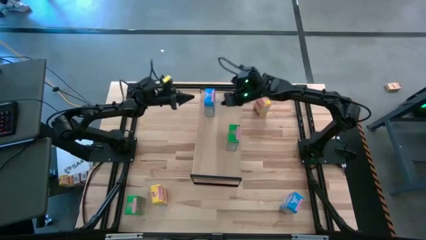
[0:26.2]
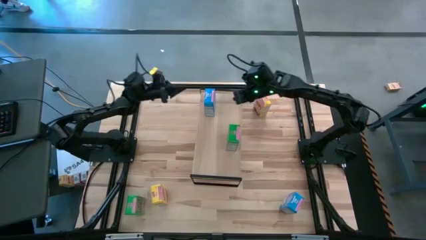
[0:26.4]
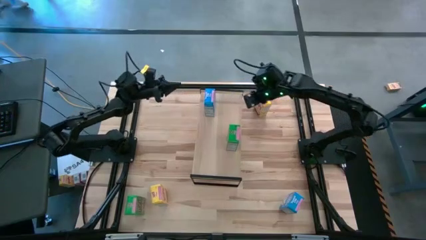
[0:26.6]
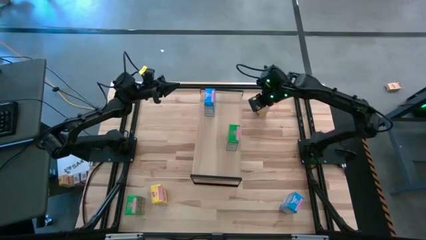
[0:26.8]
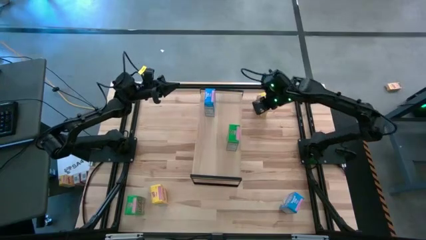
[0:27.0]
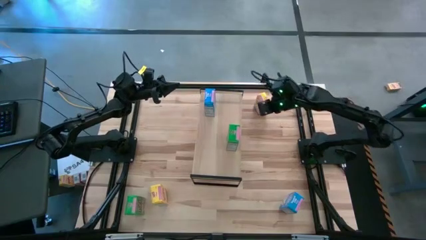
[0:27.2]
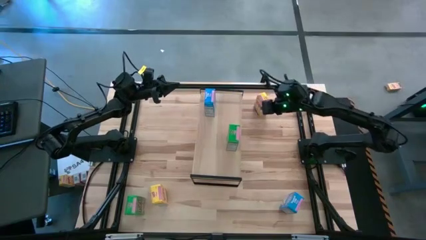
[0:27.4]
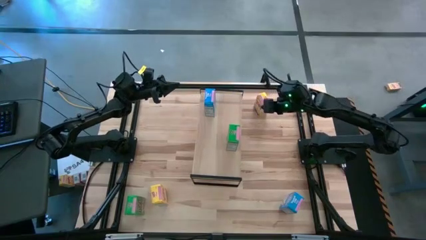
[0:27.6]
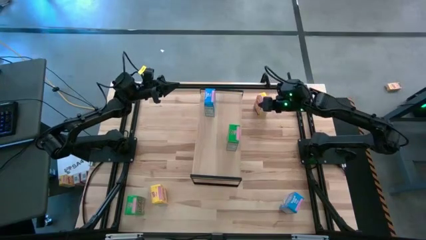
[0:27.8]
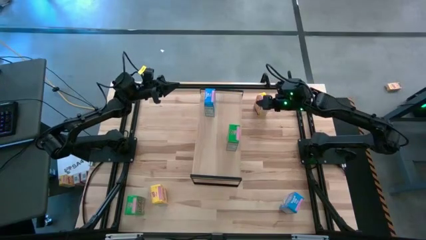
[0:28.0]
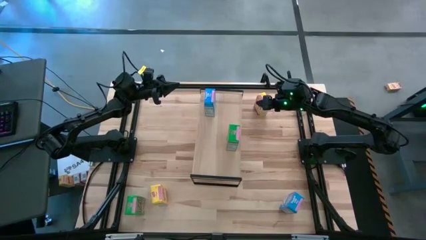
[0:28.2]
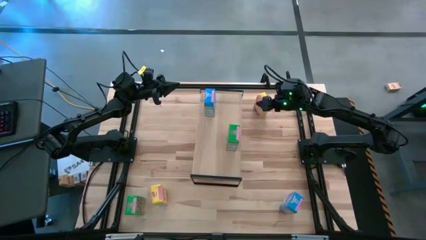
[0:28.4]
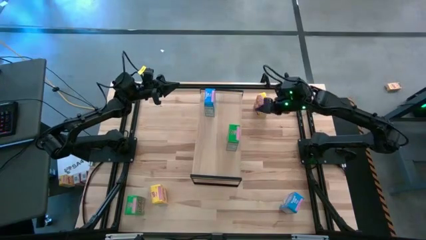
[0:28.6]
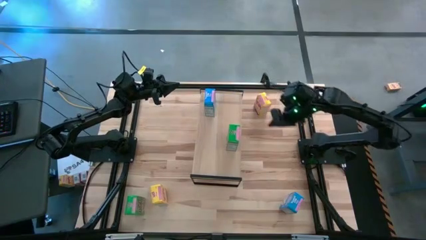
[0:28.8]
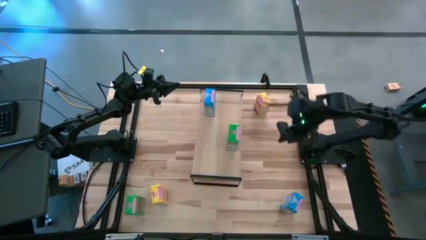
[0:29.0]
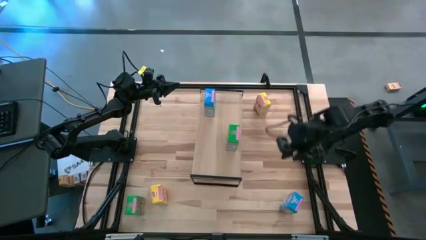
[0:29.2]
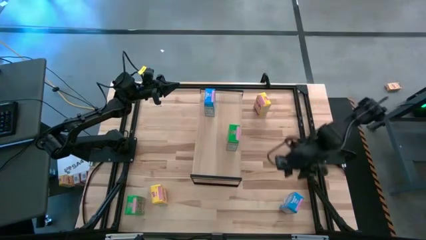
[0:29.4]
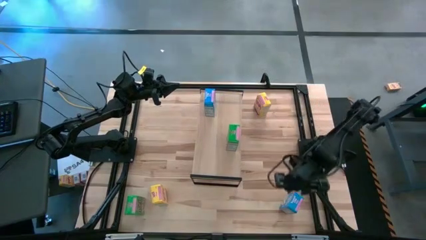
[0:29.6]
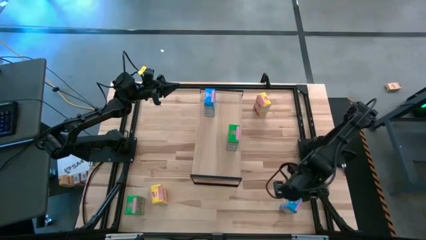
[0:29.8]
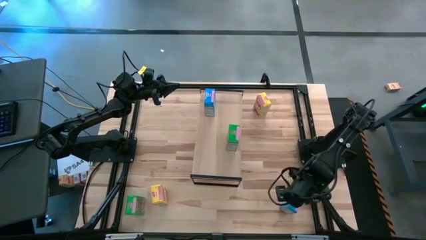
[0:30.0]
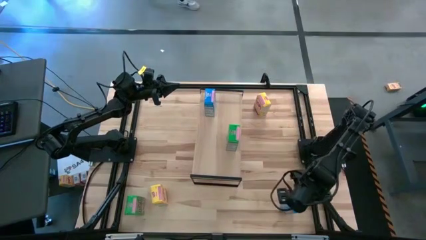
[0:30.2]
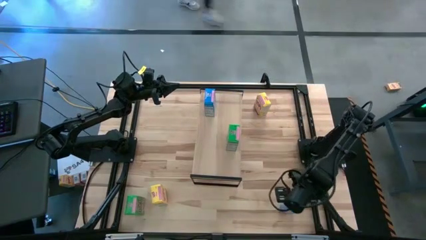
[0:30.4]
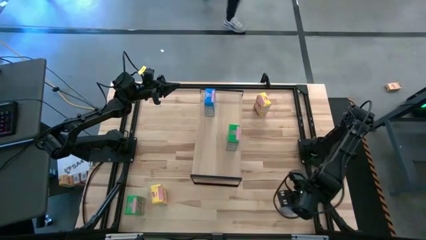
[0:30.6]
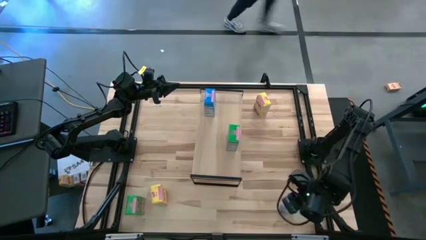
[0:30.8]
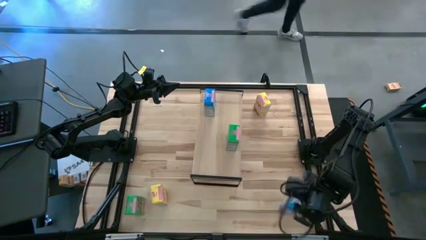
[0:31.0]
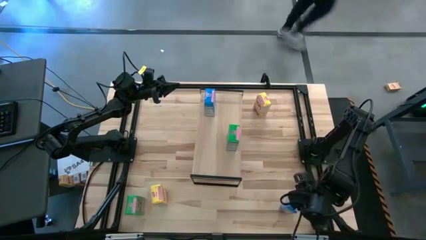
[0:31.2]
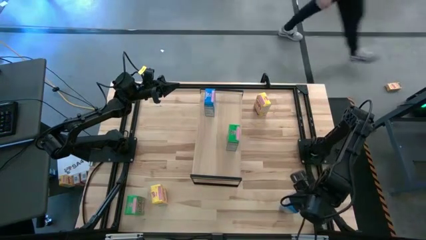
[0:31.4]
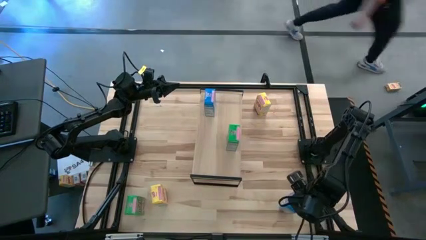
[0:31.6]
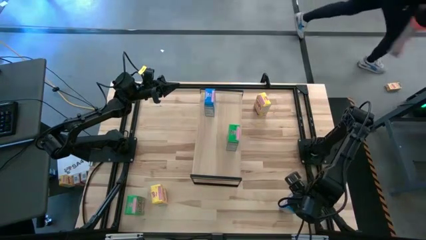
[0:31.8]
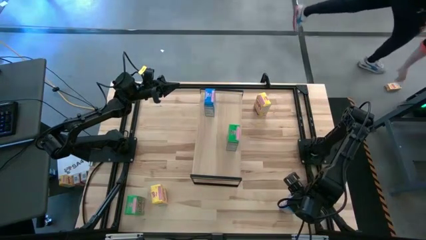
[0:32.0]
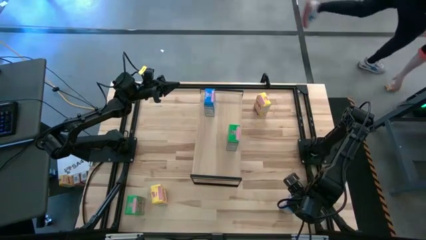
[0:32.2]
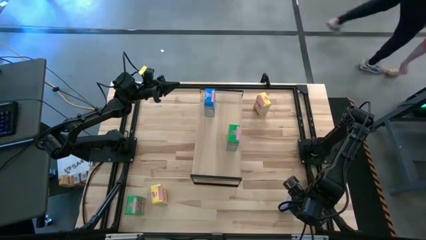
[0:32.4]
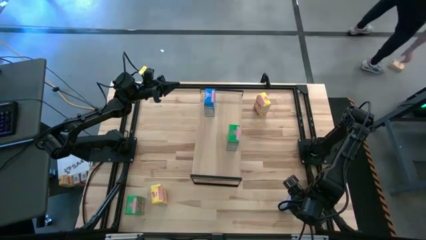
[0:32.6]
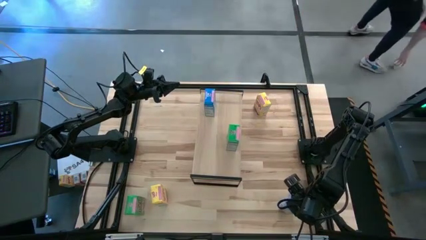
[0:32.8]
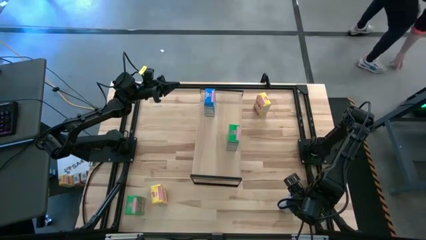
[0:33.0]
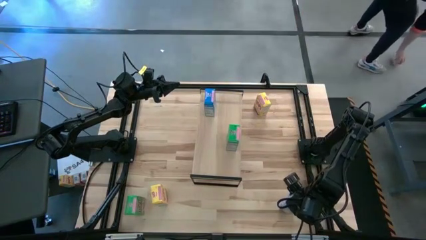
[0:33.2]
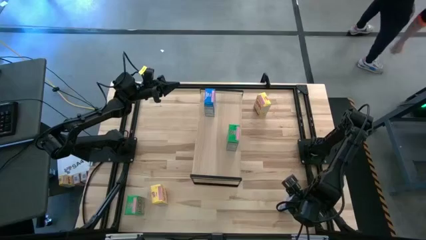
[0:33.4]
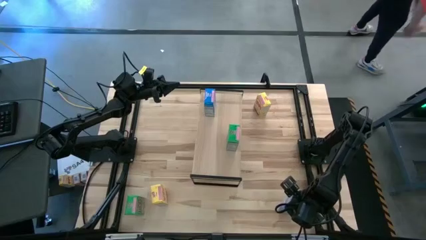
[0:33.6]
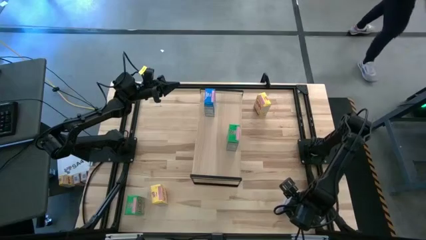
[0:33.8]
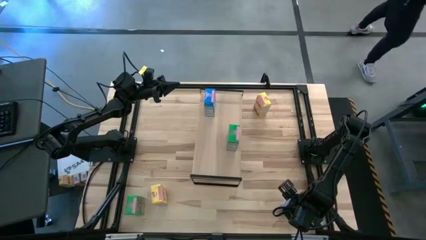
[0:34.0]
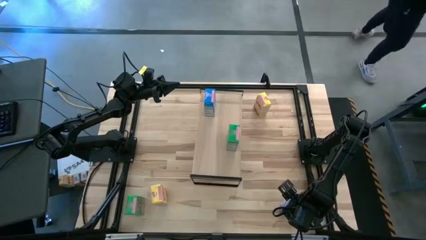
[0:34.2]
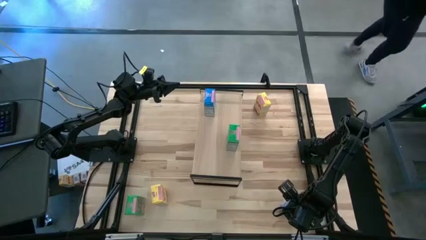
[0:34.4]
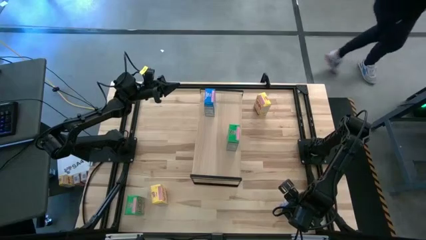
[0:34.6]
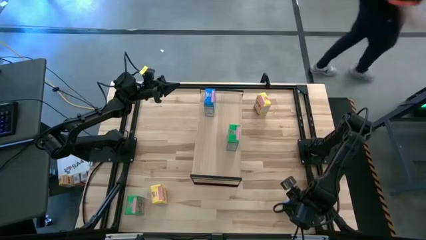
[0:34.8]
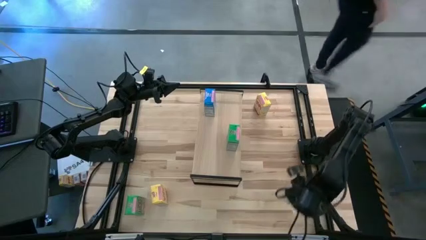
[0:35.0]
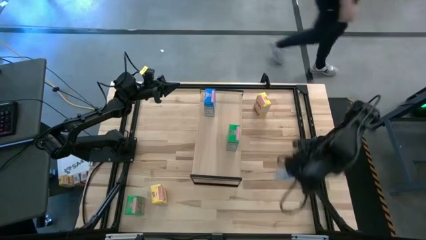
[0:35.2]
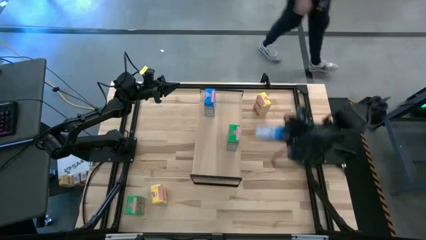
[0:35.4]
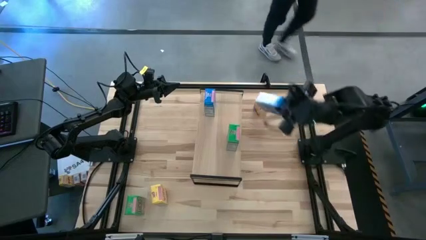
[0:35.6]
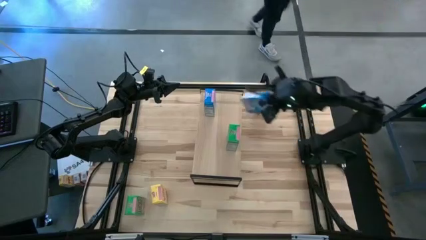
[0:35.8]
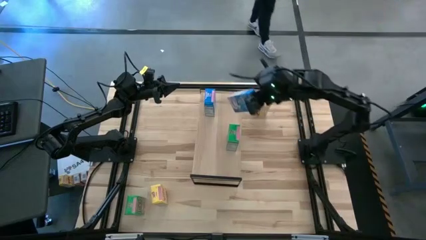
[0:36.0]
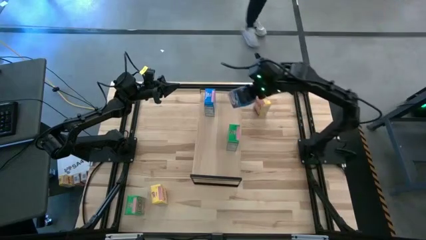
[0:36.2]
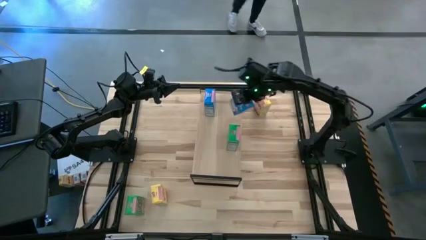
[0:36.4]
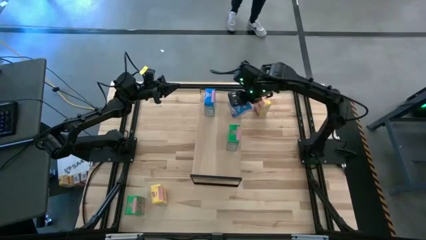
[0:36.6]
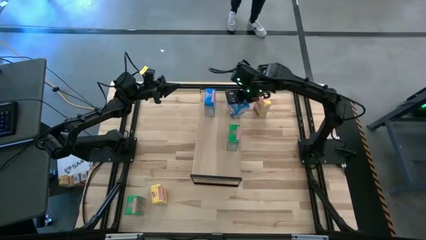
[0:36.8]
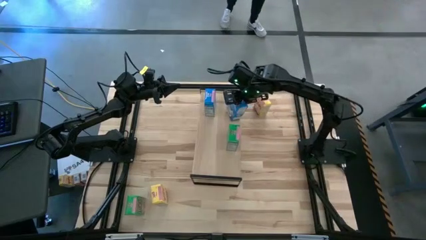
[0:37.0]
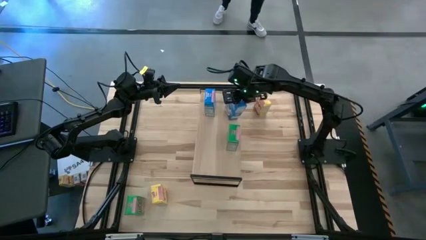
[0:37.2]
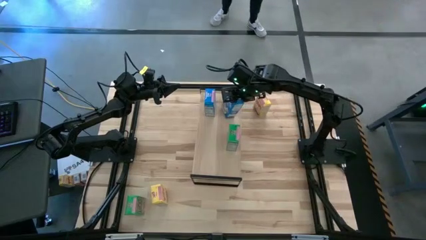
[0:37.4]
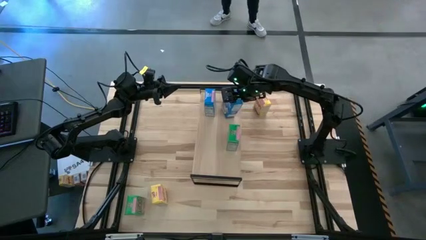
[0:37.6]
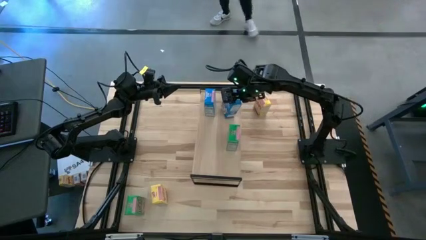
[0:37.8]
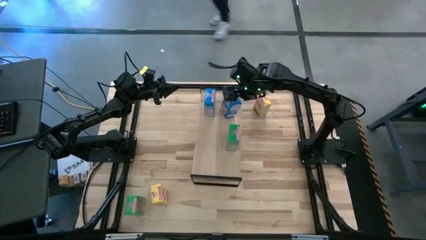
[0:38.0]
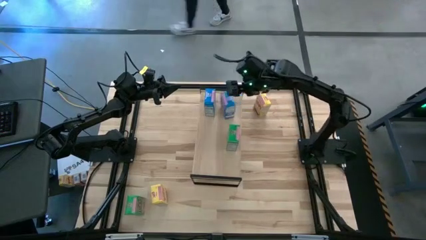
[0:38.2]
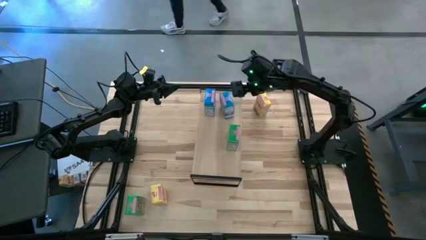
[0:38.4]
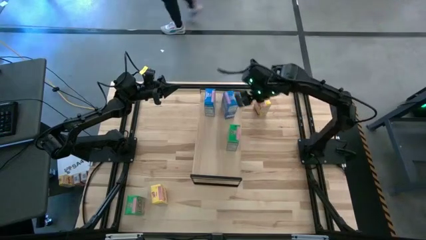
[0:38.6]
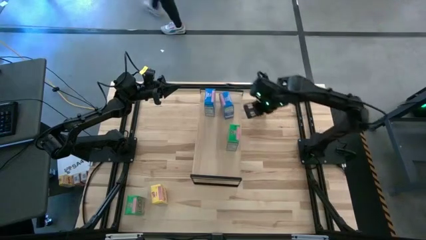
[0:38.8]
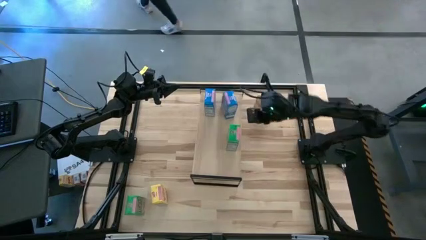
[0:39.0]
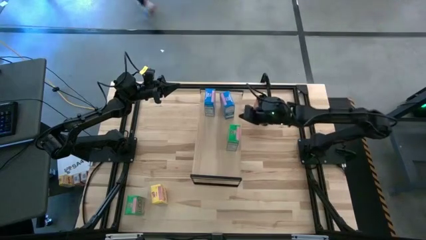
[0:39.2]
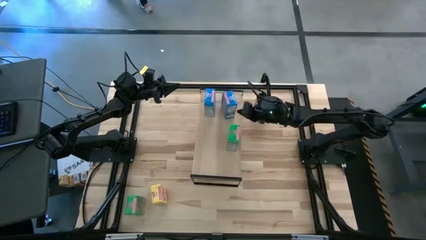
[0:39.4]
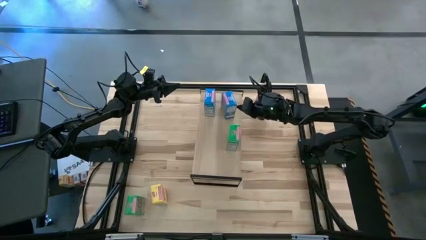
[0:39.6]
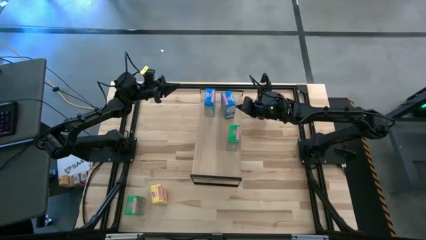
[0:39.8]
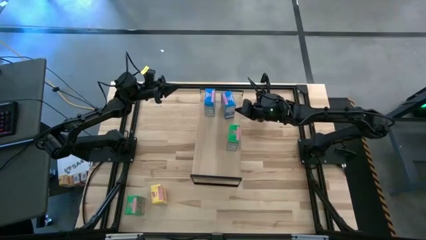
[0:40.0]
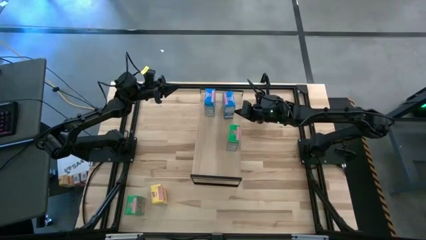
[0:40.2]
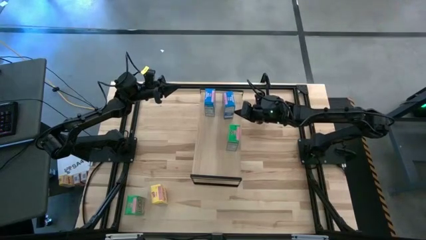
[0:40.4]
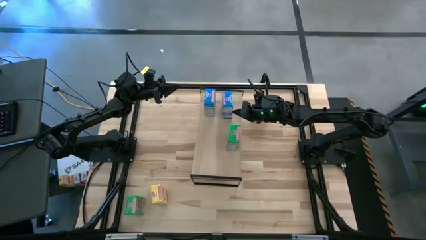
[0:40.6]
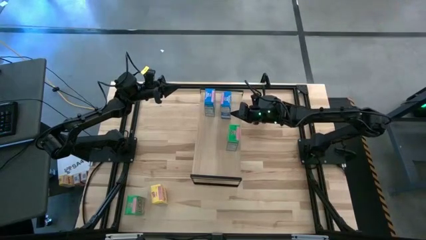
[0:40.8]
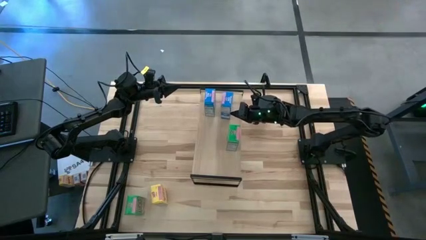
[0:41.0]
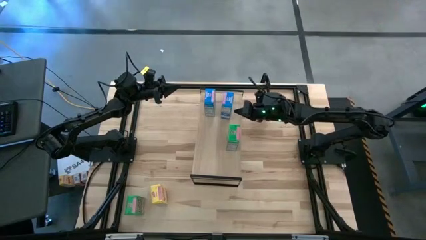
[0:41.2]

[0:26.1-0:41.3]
Task: Stack cereal on shelf
Put the blue cereal box on the shelf aligned with the other blue cereal box
